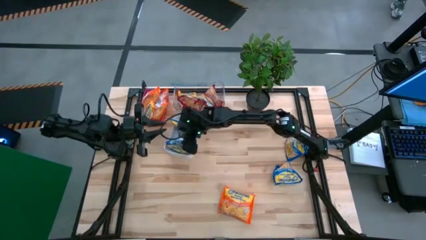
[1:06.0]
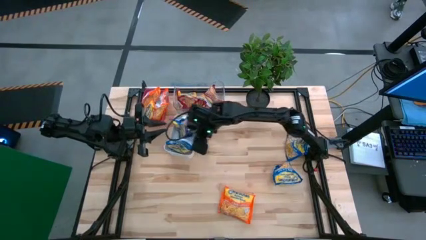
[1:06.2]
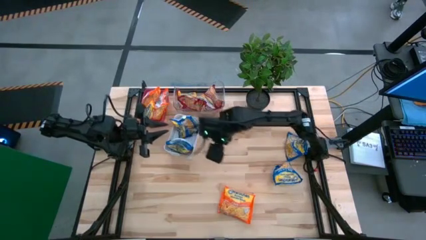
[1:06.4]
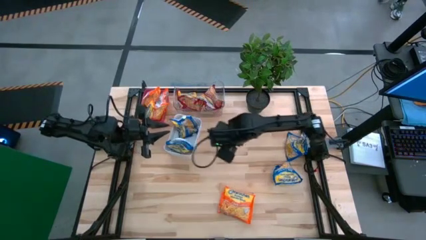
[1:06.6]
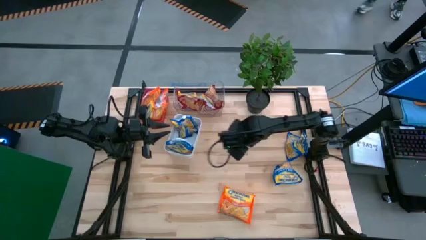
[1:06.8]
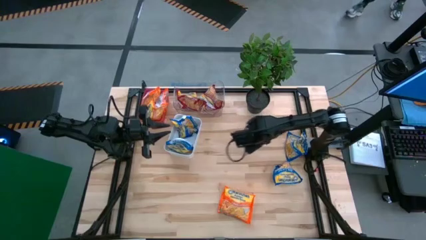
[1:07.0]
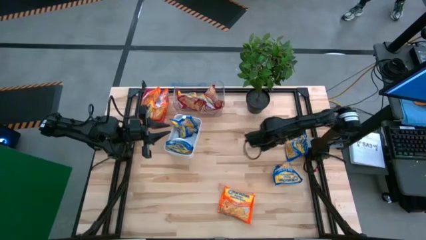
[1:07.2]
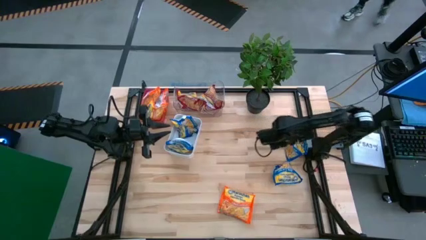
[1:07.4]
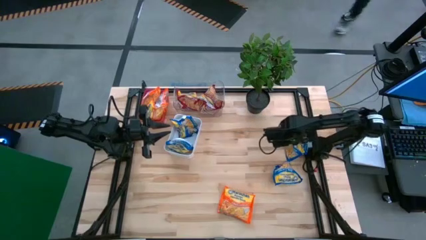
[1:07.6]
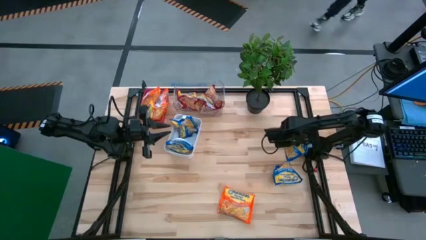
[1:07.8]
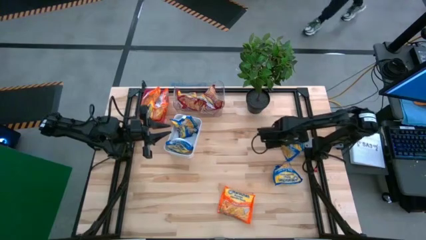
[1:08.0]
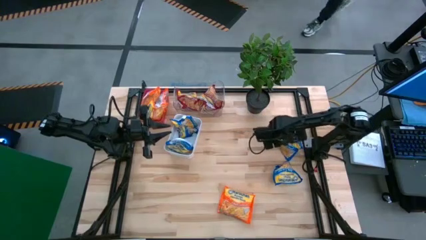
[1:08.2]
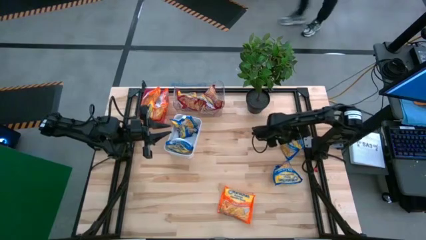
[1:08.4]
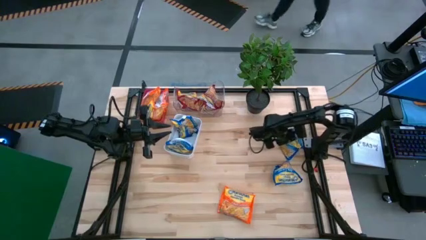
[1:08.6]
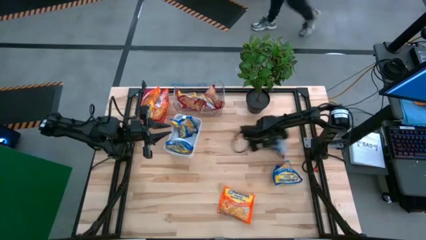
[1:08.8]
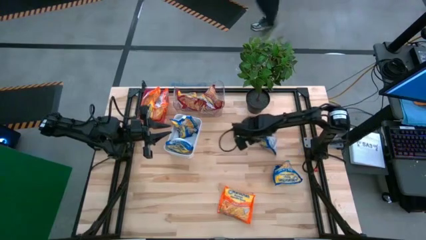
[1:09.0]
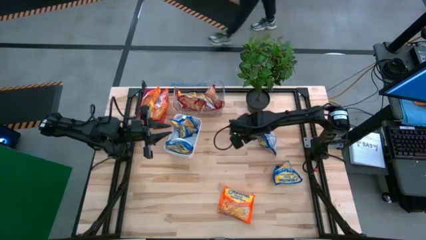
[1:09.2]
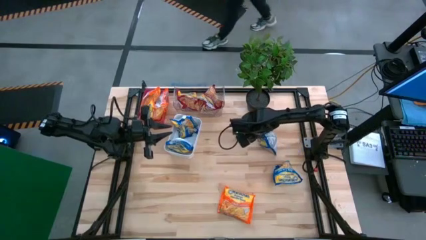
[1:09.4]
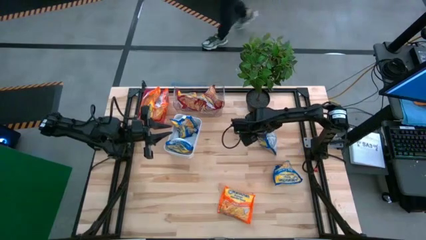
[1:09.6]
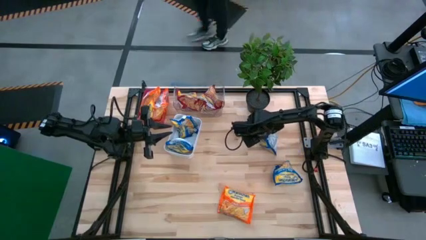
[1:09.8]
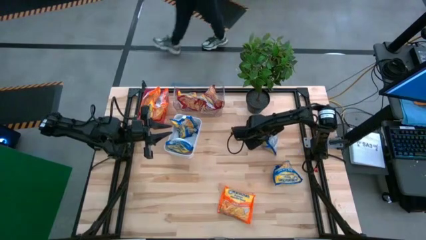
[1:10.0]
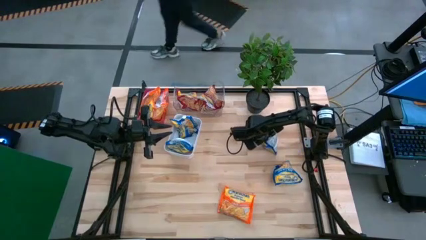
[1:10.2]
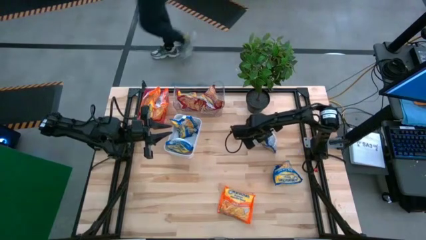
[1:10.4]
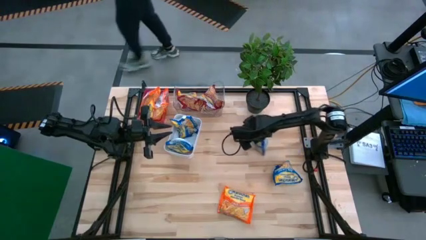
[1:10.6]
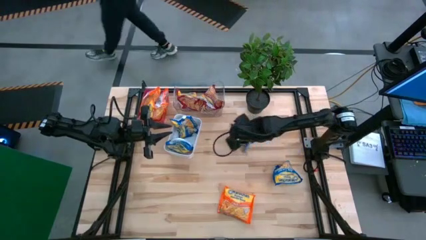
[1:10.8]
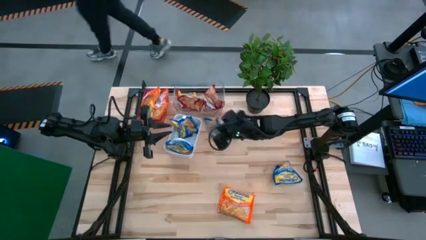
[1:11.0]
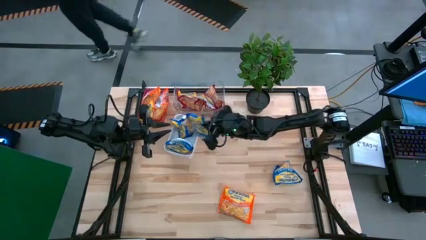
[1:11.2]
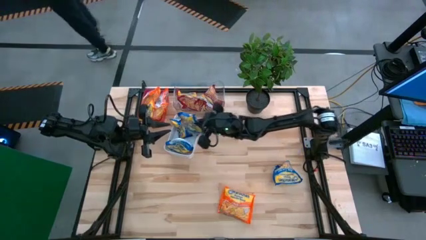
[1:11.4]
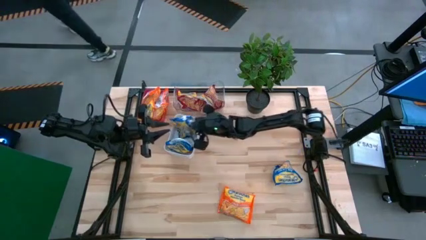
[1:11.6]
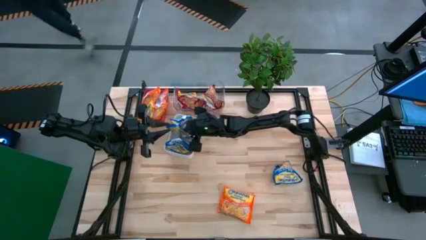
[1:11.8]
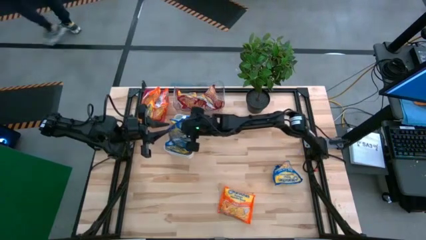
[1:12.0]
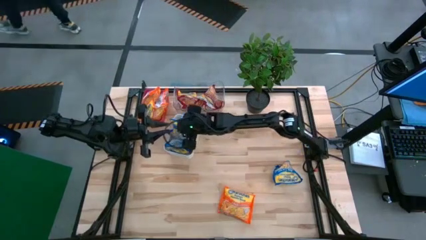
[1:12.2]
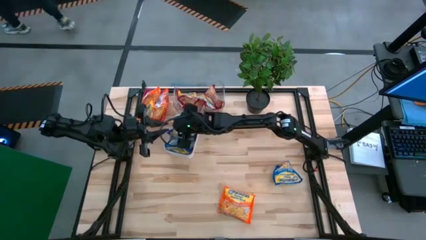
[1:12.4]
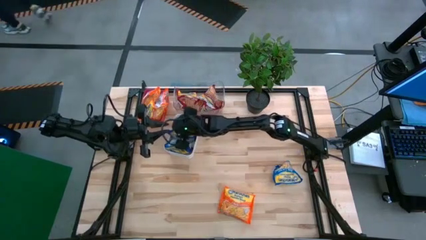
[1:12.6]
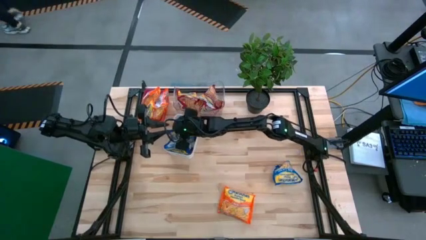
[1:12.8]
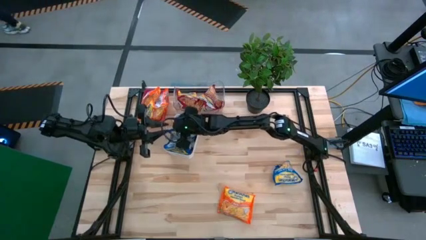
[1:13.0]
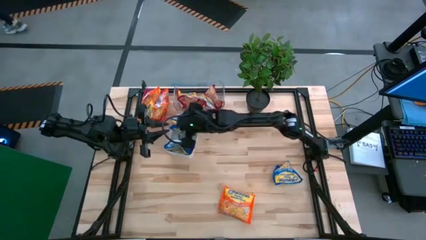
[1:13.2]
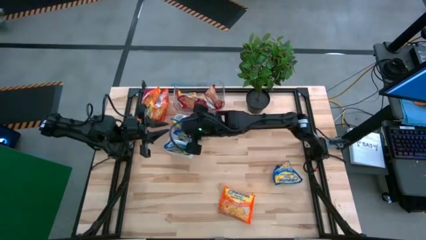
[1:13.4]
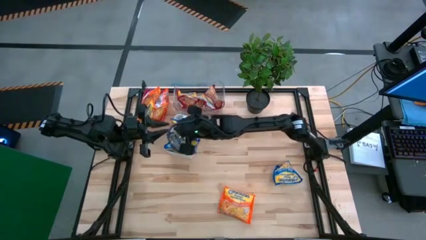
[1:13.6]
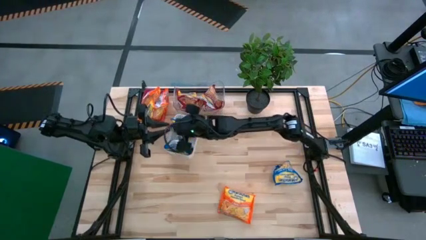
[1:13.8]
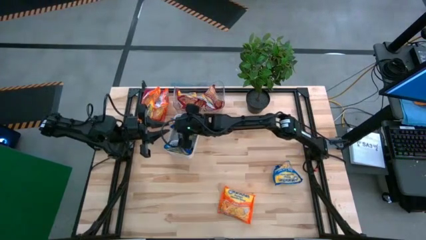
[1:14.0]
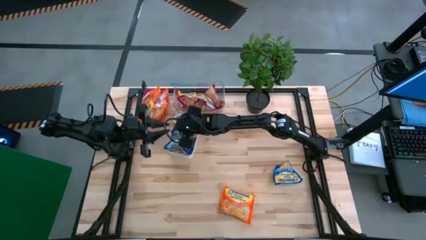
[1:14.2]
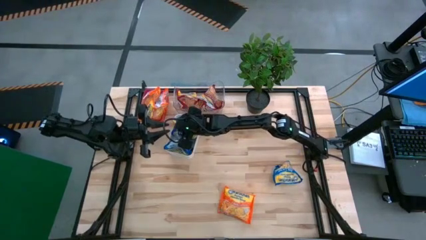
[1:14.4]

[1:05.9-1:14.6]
Task: Sort Maruchan noodles
Put the blue noodle pack into the white bin

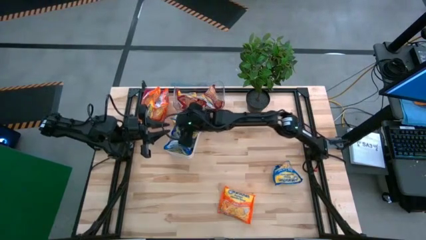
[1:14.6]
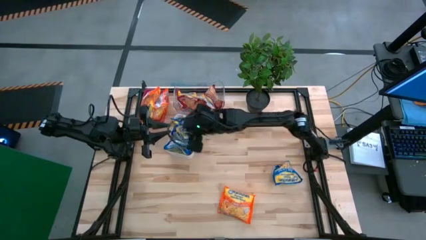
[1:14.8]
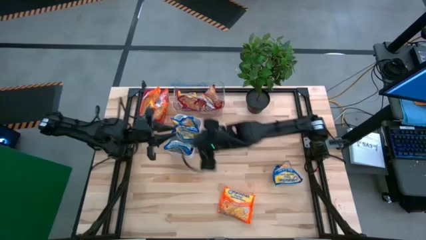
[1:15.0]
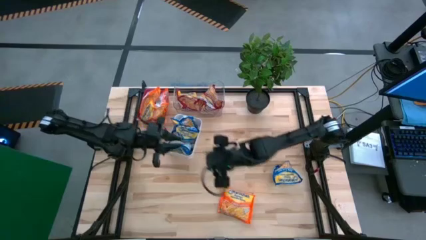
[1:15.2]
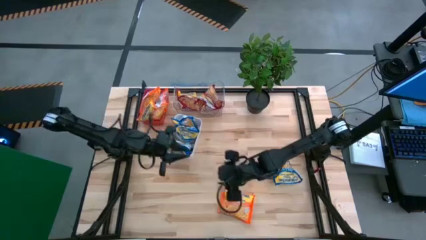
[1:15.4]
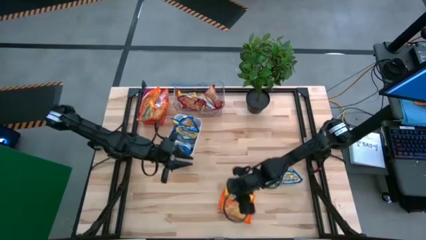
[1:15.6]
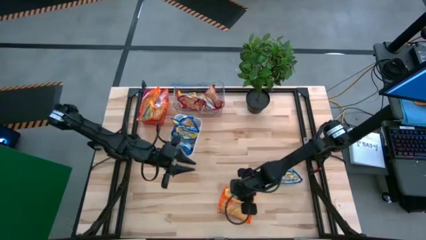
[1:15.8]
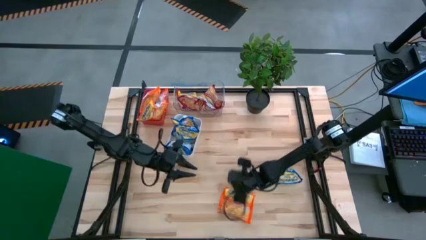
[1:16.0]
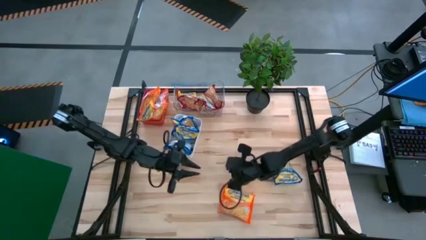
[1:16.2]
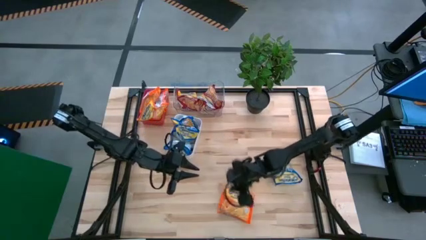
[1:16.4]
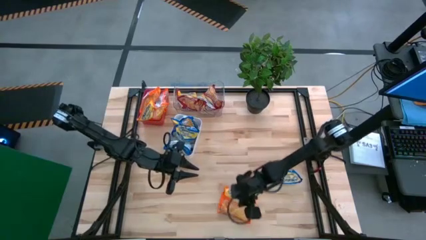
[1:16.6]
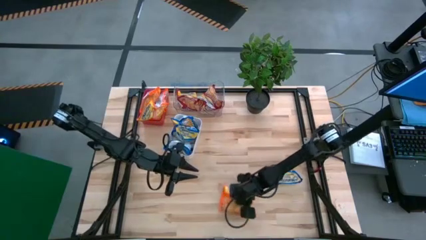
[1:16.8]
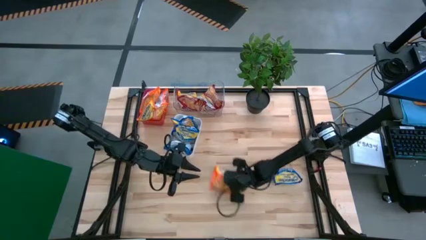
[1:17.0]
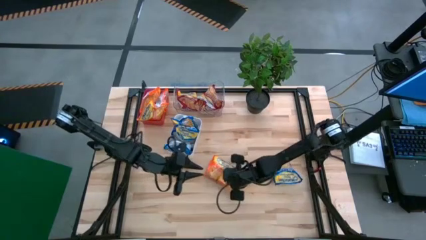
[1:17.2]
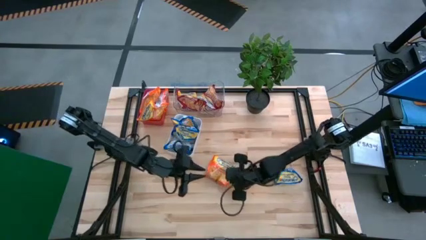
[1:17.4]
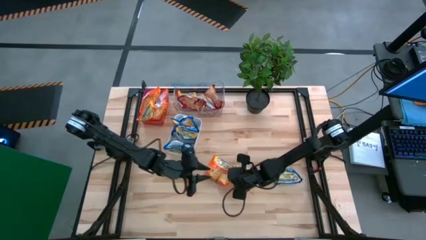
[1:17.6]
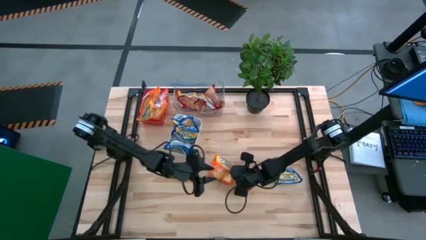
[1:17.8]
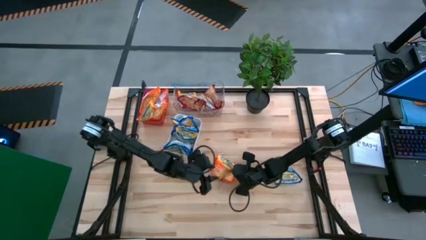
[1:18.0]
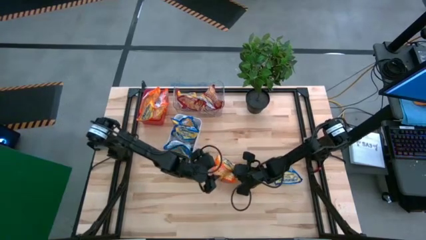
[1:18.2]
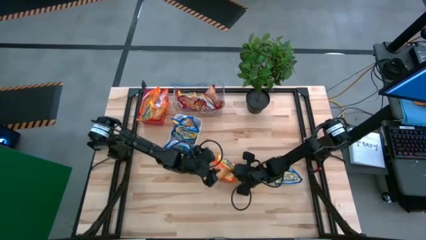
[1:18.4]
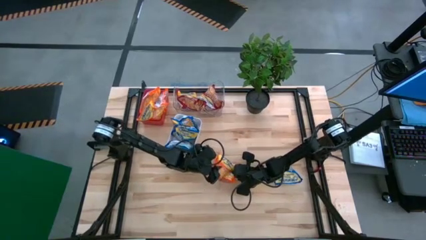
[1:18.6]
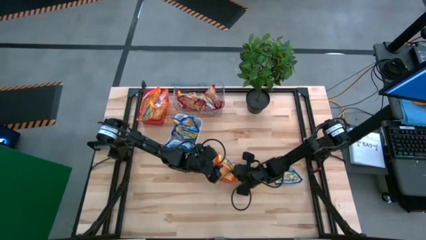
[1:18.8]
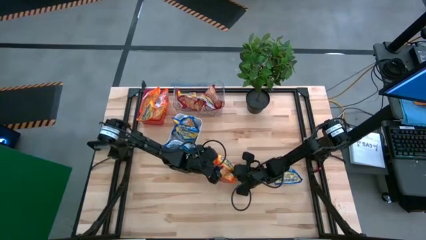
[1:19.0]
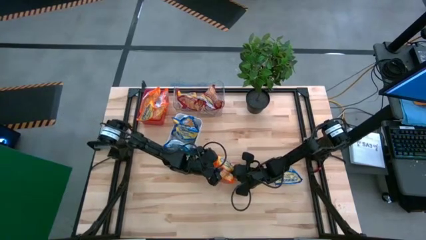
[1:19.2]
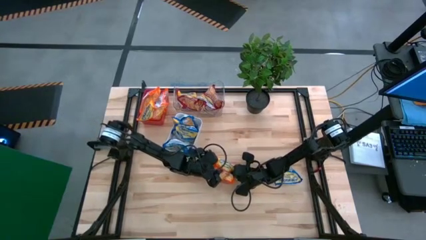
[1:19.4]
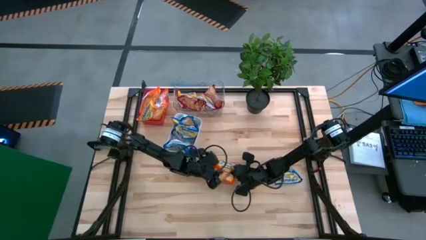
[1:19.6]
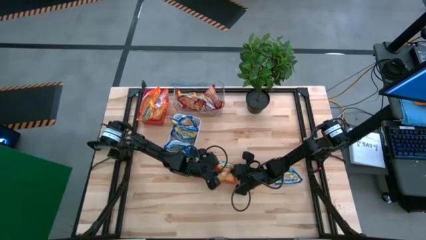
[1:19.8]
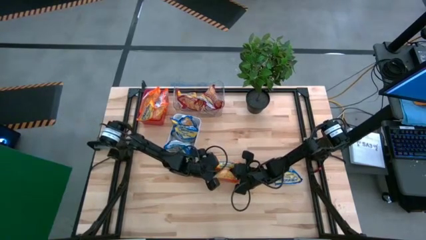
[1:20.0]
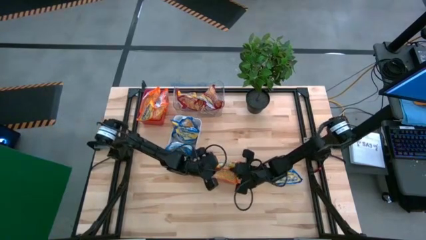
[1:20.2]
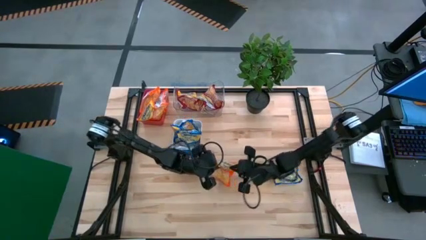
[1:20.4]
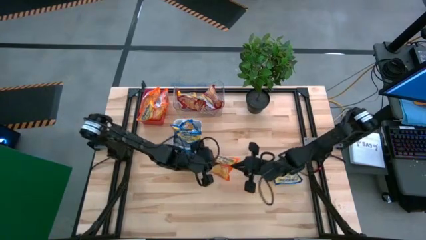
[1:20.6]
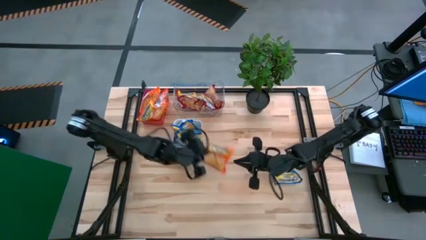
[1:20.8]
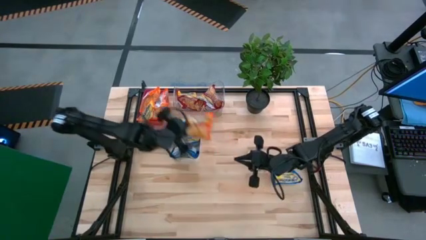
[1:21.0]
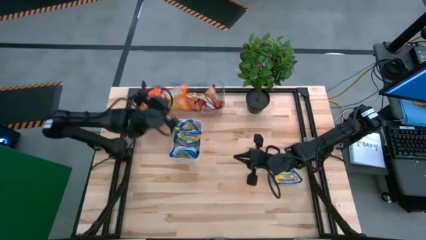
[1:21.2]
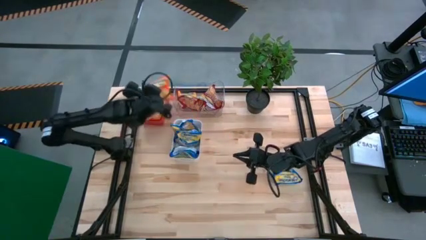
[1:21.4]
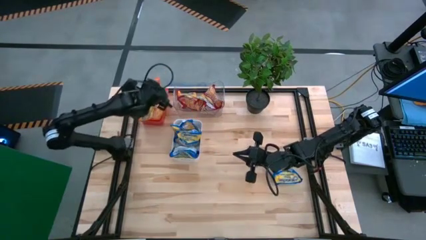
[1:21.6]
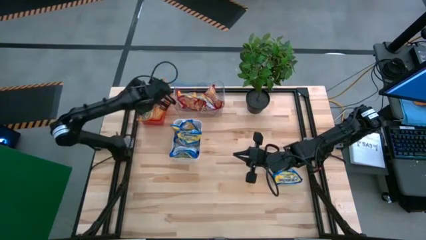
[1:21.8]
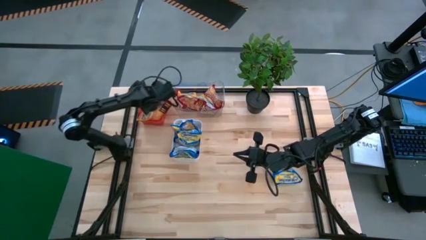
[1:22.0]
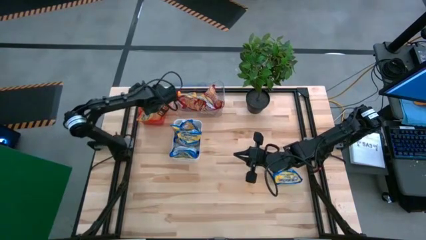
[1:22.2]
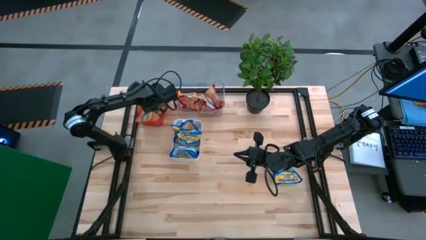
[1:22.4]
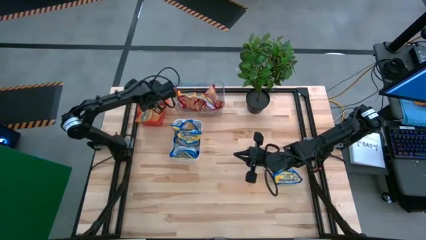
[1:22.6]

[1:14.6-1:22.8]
Put the orange noodle pack into the red bin
